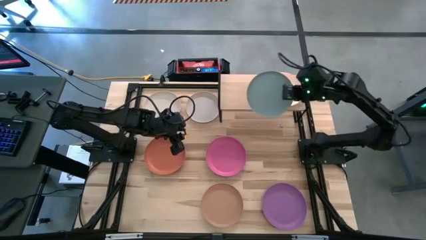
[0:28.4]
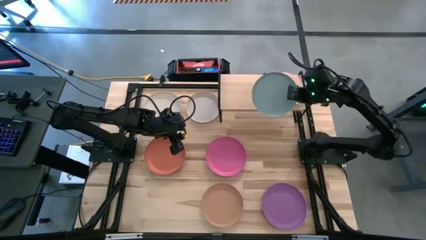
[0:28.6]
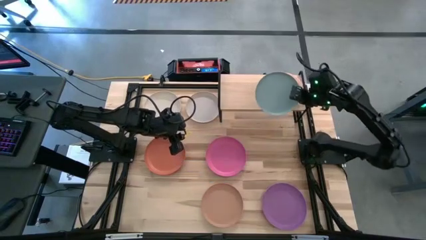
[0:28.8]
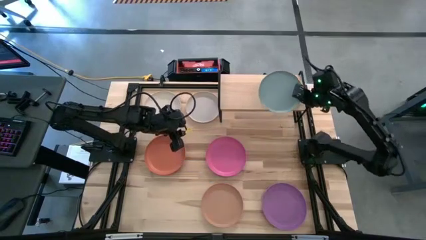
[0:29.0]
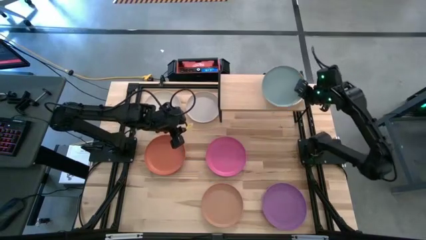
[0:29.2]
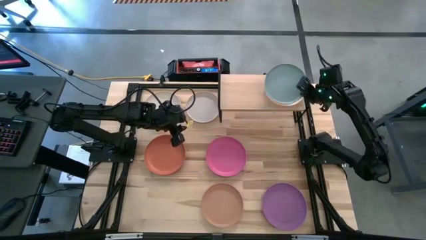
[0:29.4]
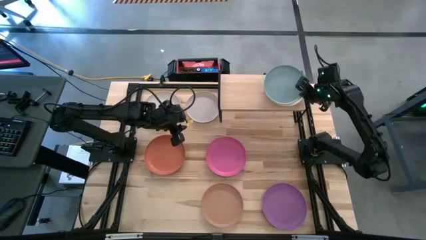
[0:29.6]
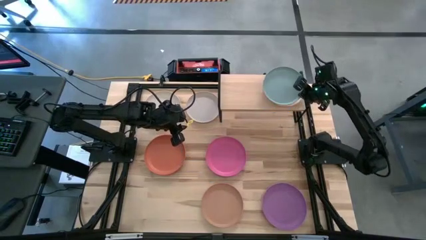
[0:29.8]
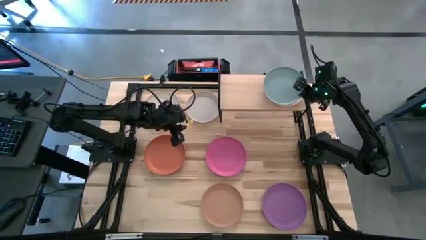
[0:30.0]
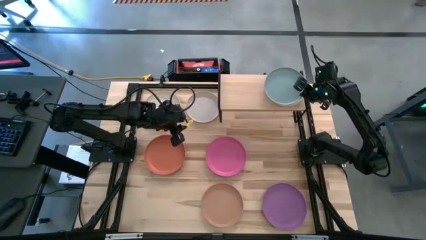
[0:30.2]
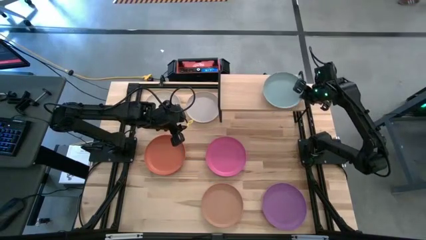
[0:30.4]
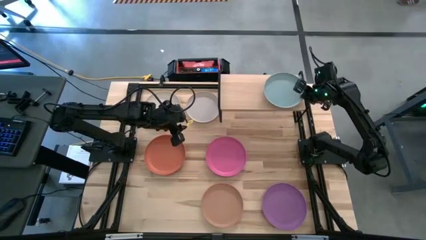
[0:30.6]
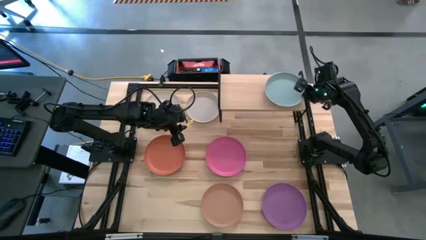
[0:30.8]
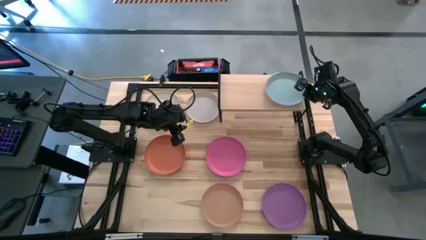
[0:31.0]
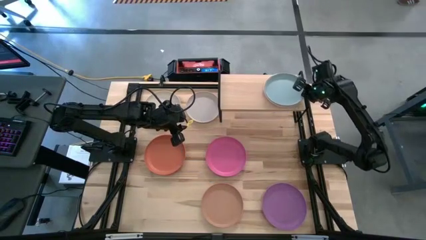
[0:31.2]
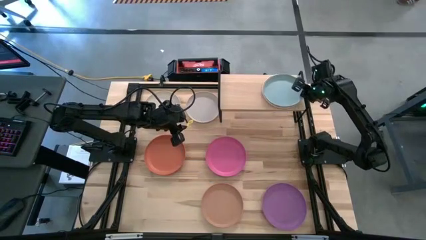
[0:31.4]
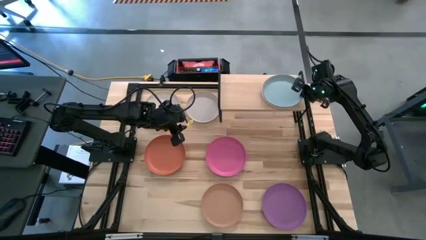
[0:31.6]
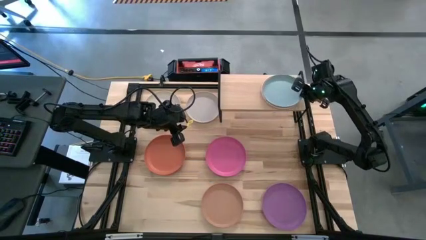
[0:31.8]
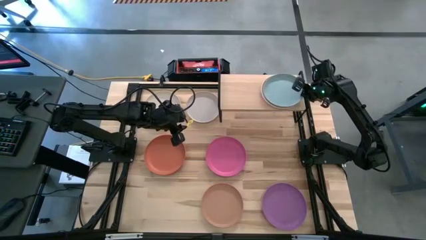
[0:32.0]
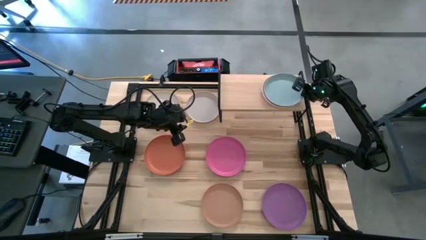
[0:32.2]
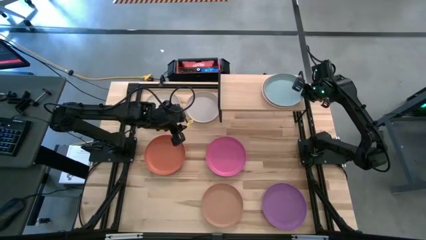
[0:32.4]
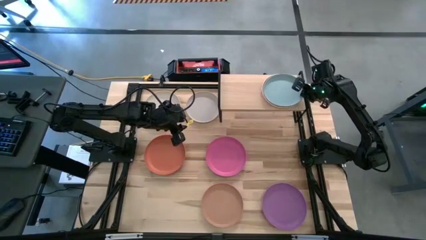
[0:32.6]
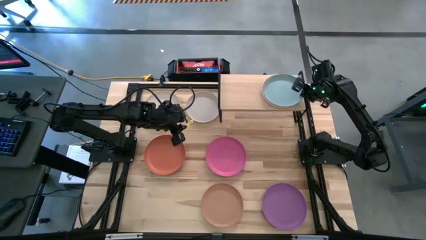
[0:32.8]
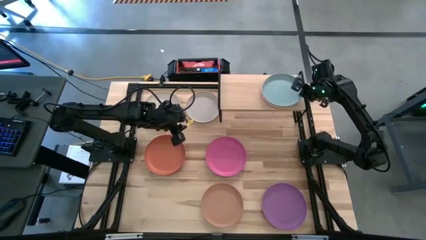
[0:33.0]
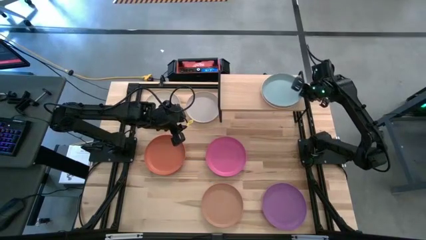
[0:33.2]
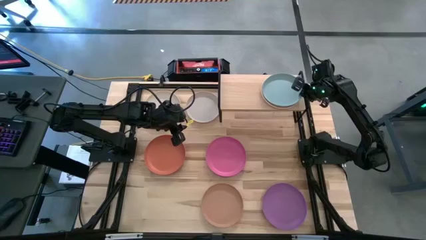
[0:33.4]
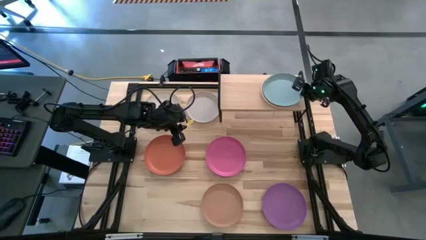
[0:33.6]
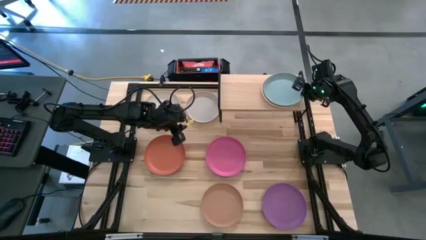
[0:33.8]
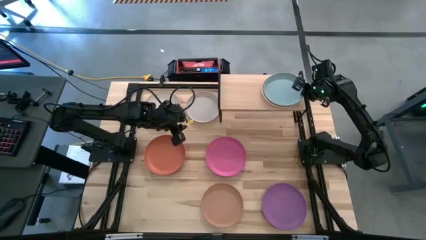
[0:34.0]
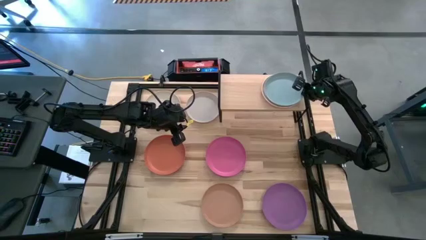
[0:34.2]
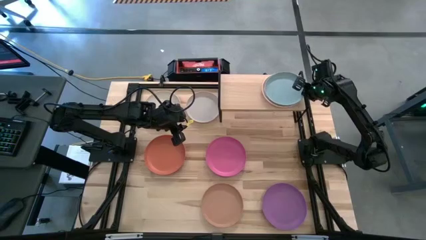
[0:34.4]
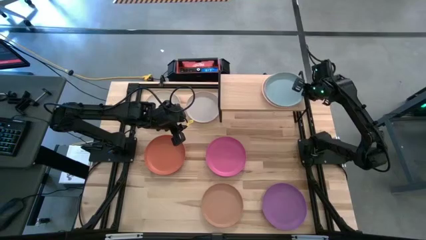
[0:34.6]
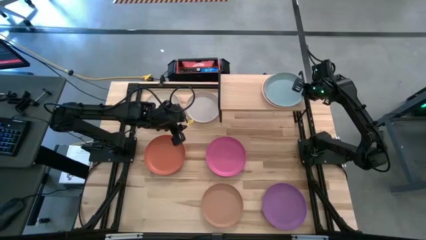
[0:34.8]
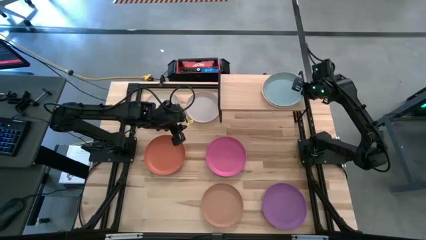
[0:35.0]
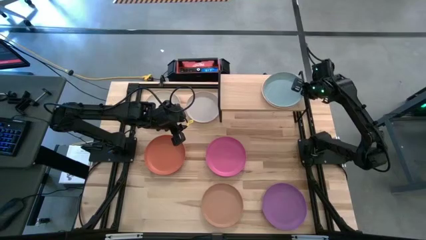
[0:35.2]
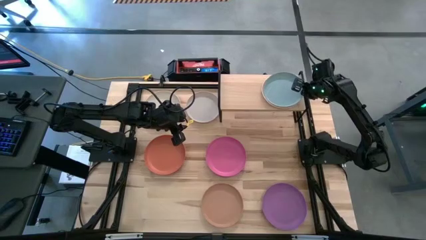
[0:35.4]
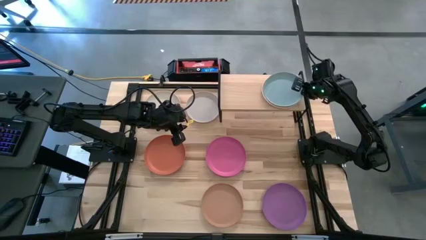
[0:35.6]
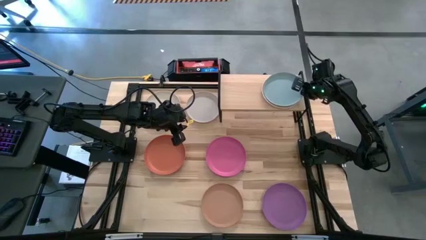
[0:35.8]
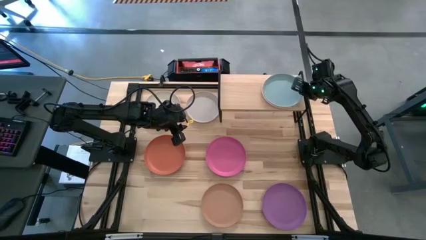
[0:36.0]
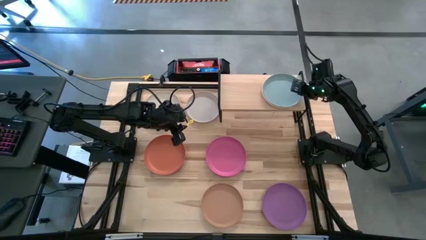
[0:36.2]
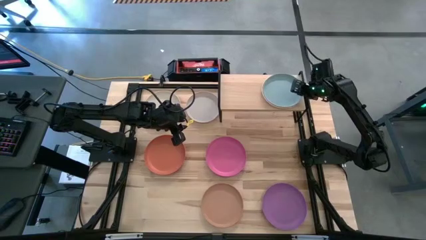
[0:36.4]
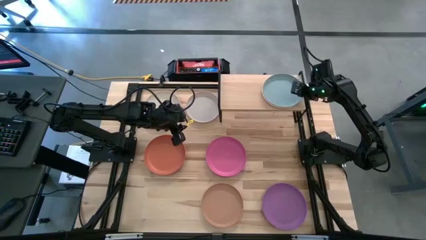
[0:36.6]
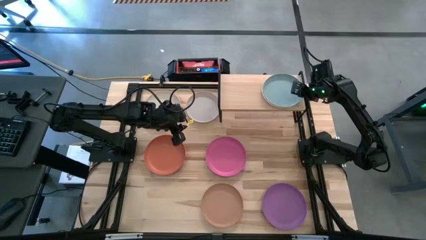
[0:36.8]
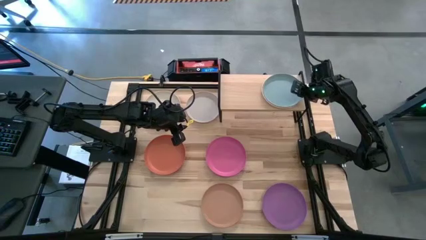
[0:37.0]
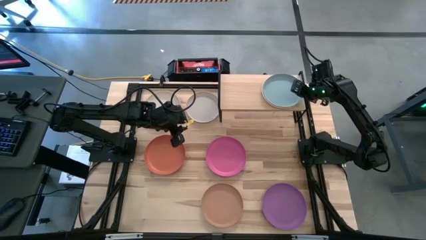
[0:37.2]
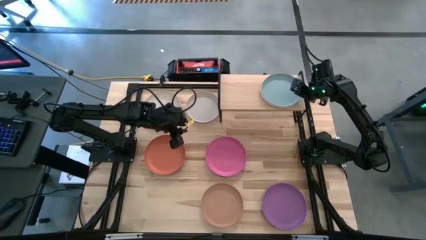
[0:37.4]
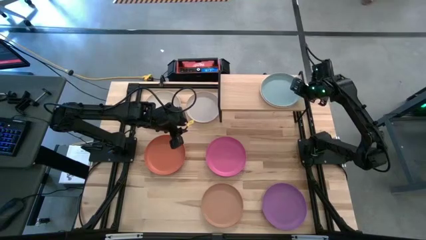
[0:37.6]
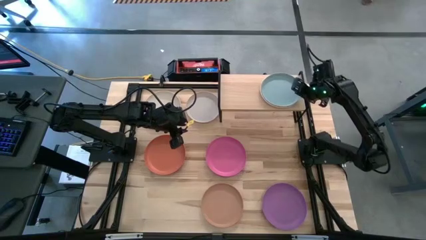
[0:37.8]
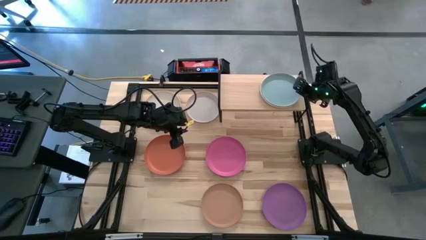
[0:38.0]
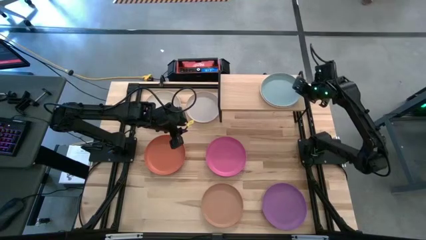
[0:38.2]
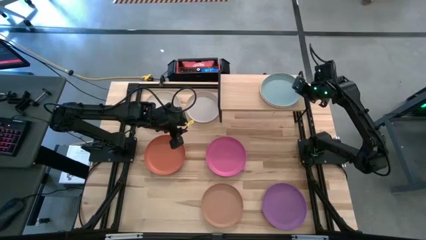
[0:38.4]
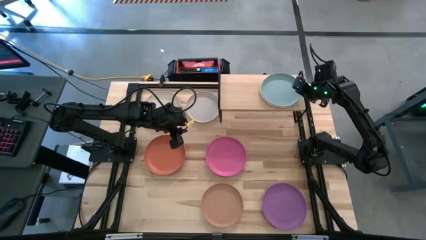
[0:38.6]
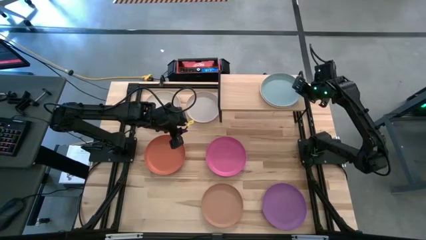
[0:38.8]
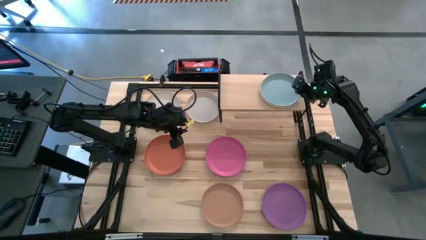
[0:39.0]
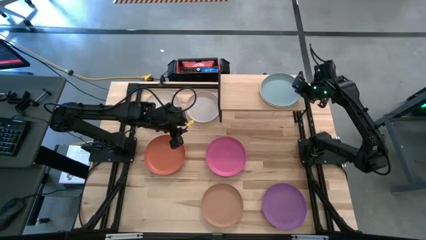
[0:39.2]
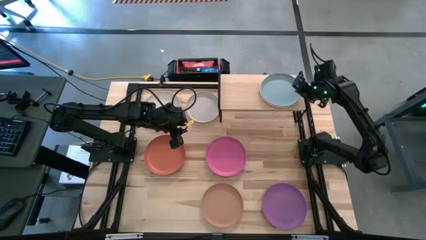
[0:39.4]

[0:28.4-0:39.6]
Task: Place and stack plates onto a shelf
Stack the blue plate on top of the white plate on the shelf
